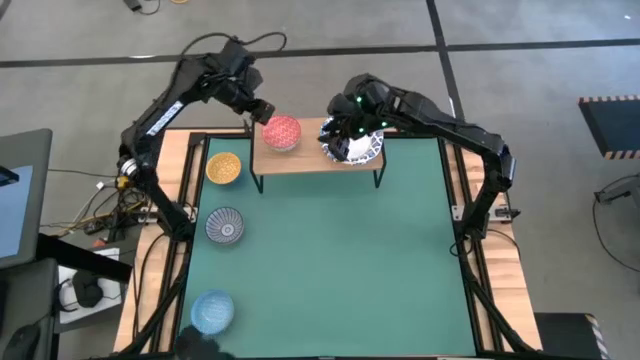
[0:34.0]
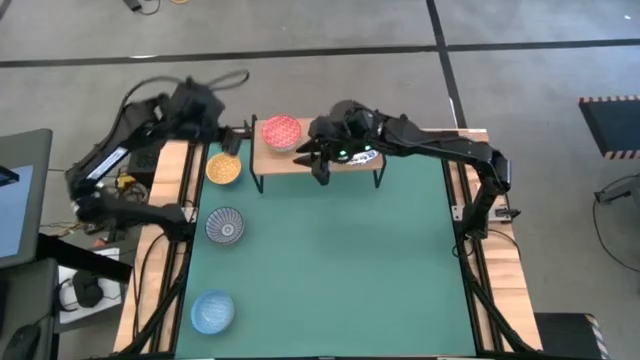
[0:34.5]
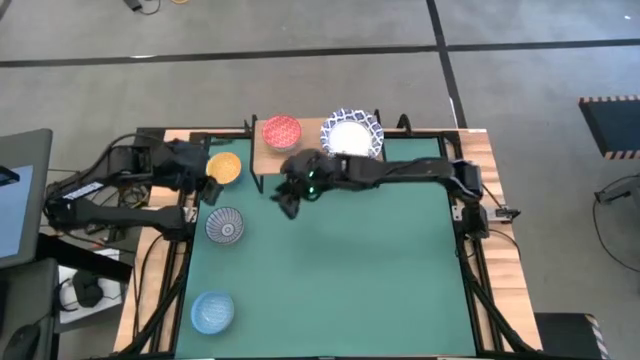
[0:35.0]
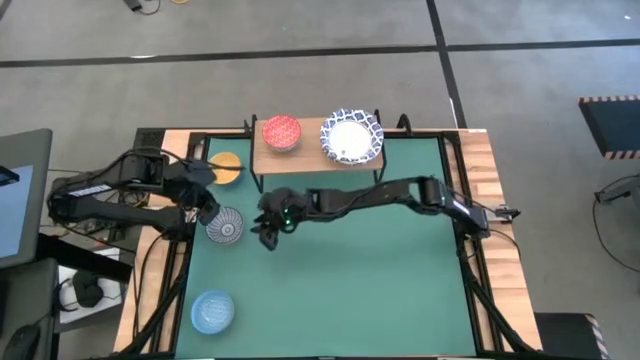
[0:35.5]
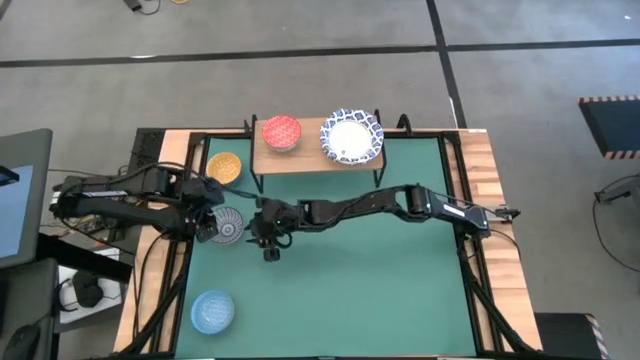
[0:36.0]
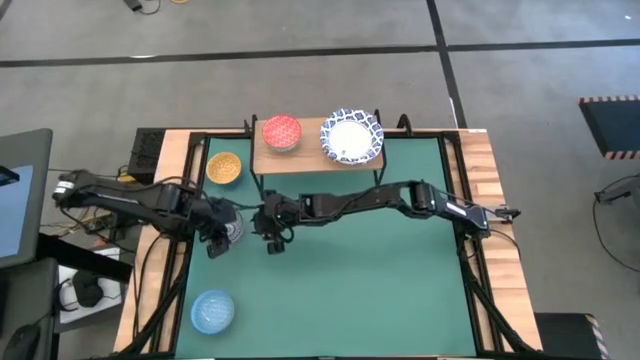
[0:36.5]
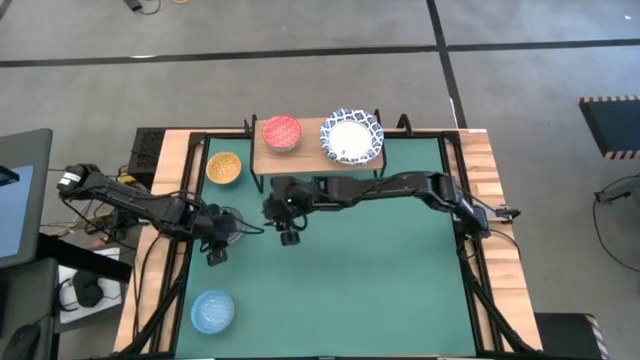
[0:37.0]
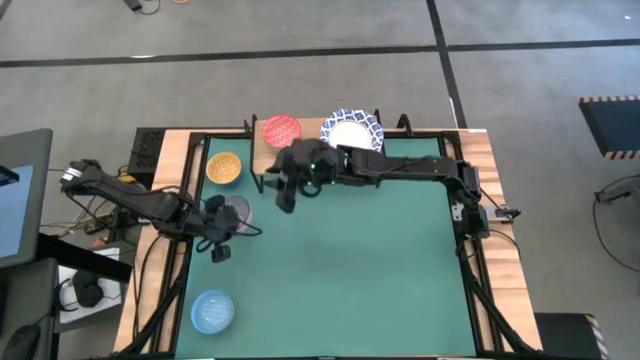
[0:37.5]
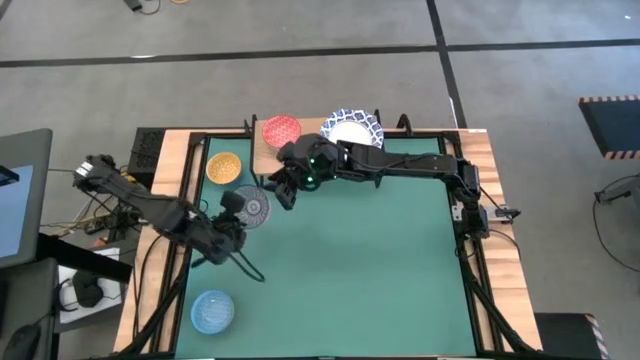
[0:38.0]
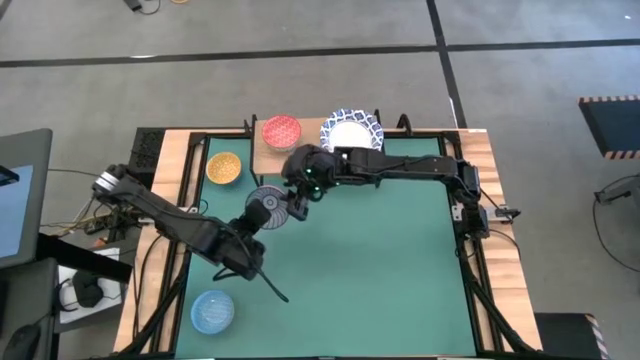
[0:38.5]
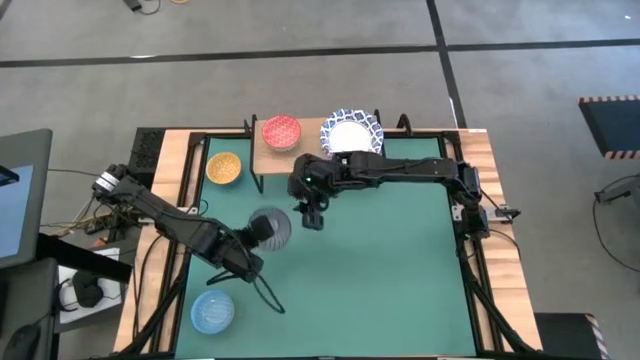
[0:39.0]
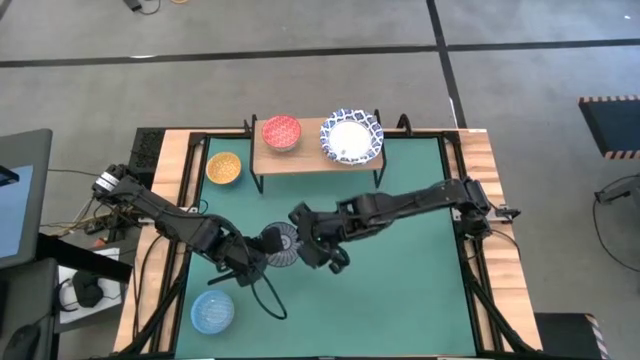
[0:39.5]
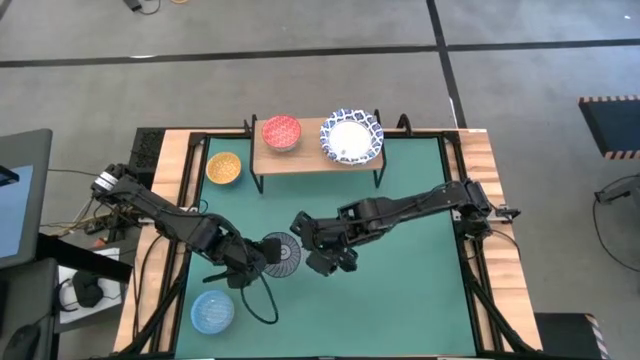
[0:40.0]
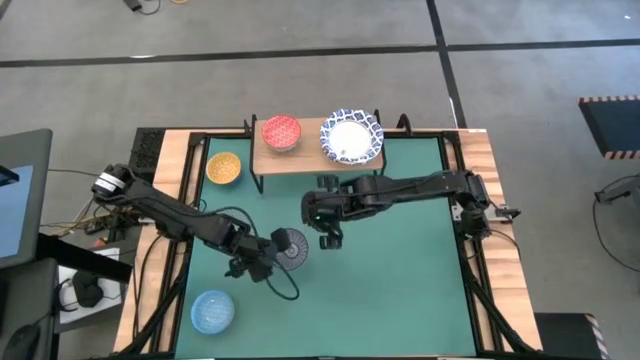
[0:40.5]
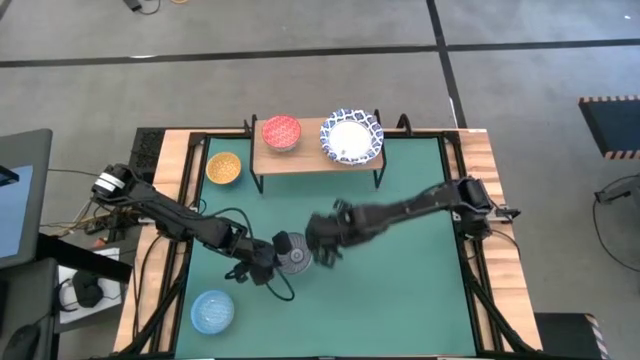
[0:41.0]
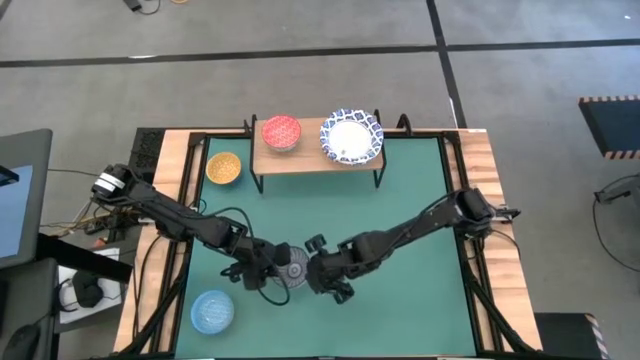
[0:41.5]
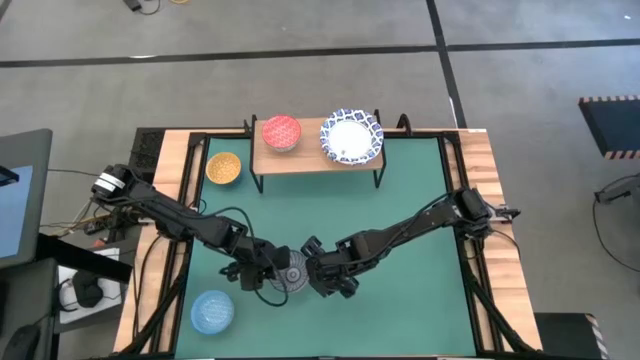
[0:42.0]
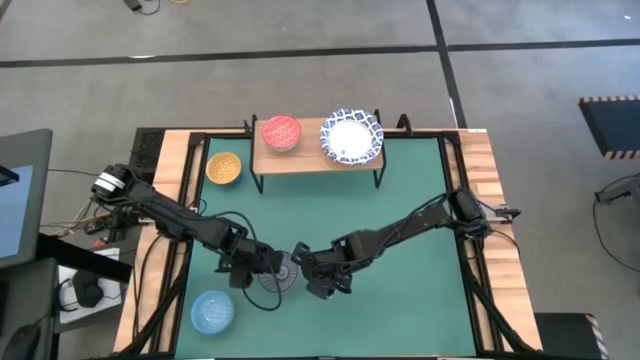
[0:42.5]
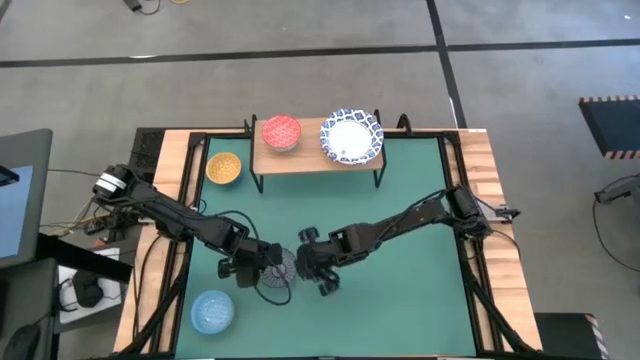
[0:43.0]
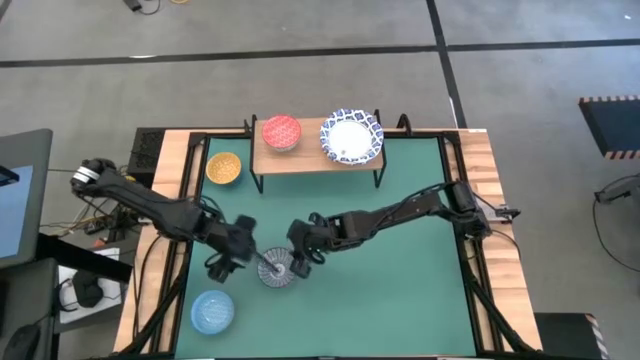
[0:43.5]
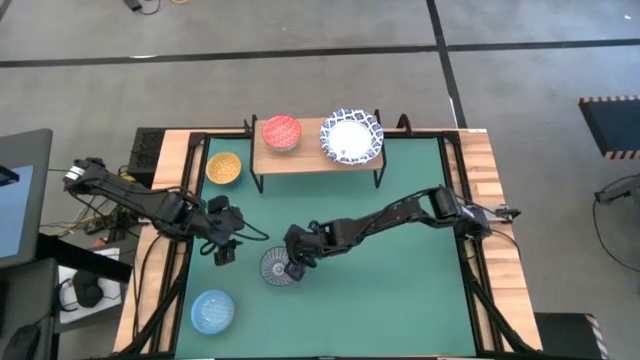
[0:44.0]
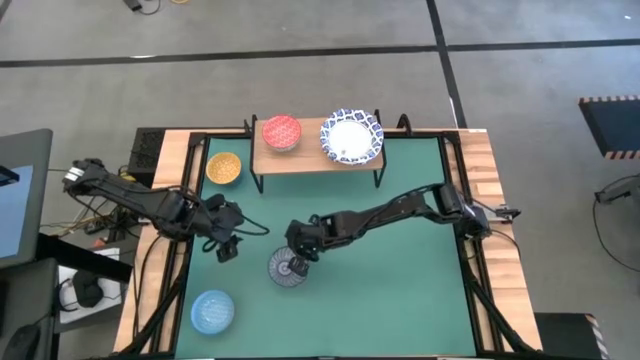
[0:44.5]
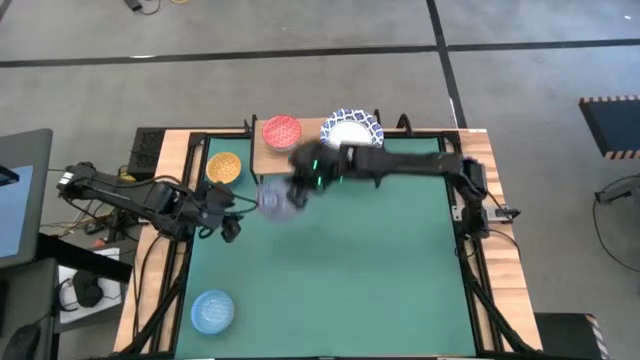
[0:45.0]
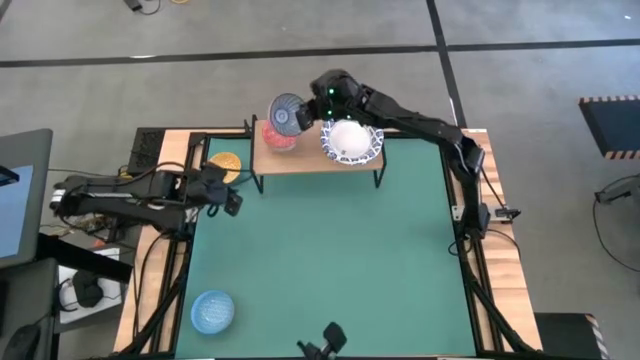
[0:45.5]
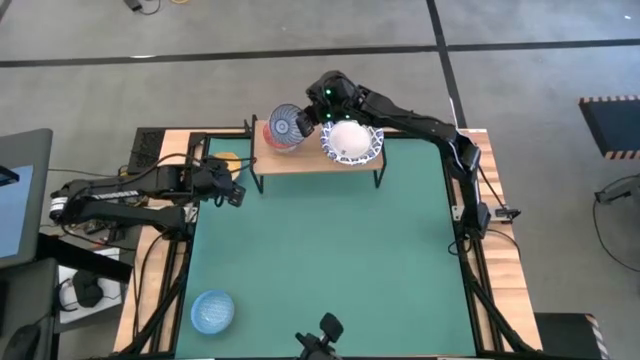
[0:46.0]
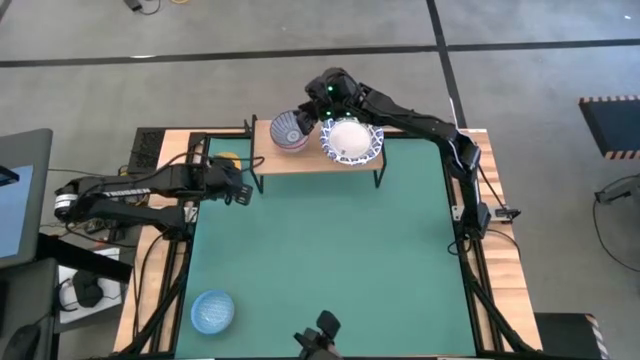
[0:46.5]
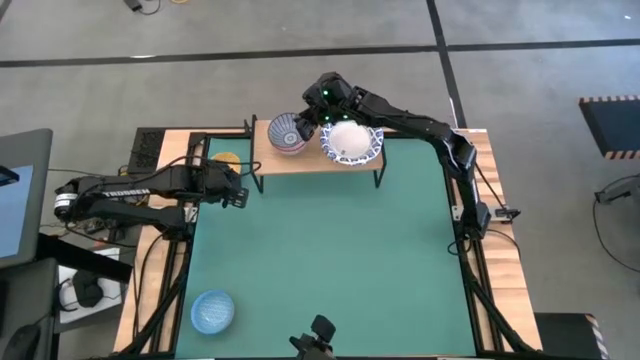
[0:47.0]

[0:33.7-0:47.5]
Task: Place and stack bowls onto a shelf
Stack the patterned blue bowl on top of the red bowl on the shelf

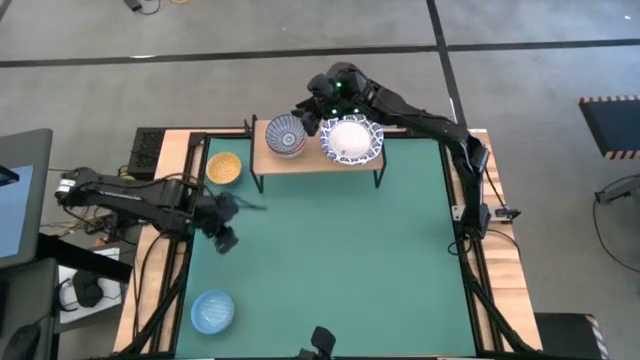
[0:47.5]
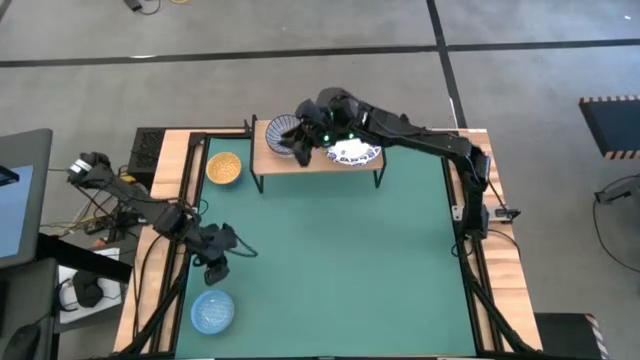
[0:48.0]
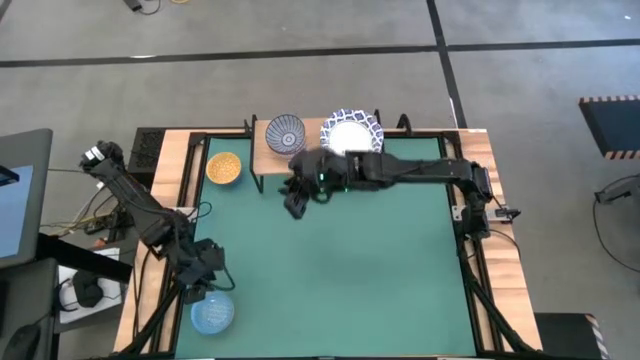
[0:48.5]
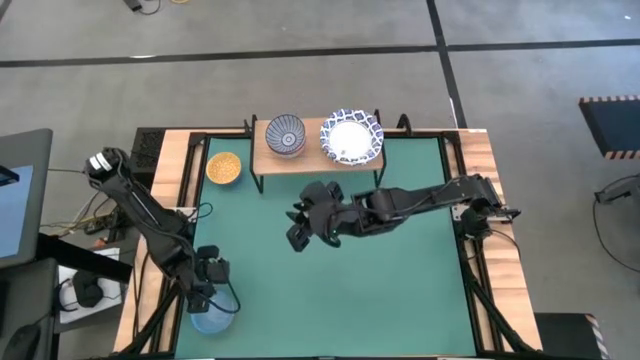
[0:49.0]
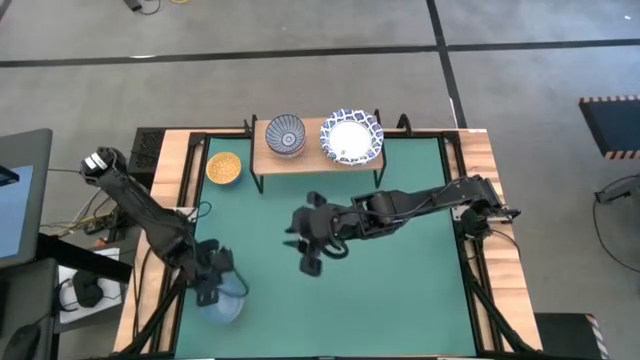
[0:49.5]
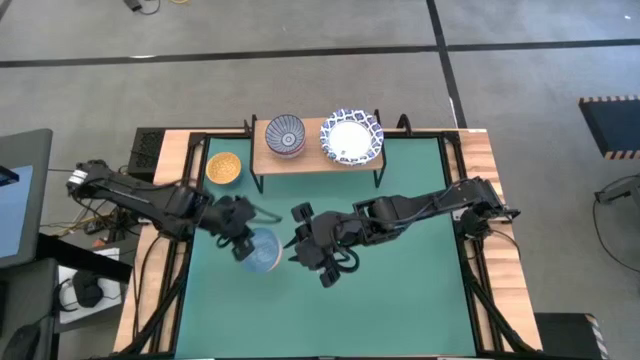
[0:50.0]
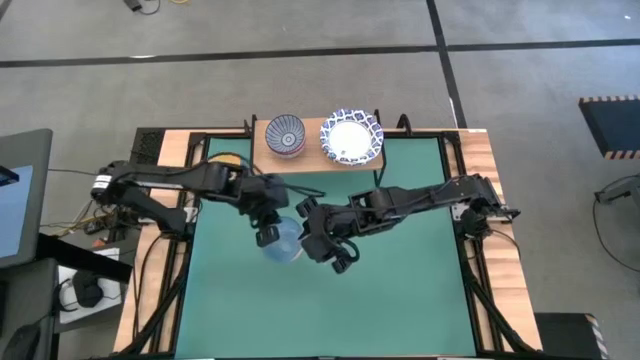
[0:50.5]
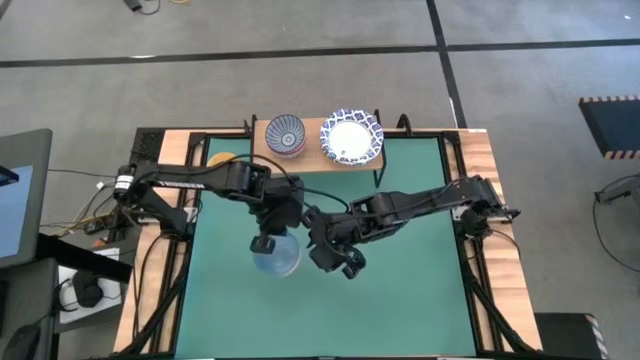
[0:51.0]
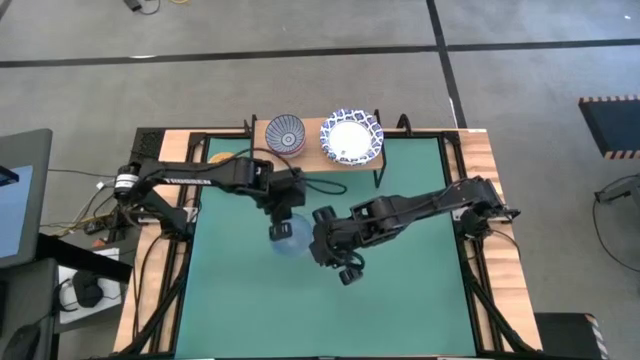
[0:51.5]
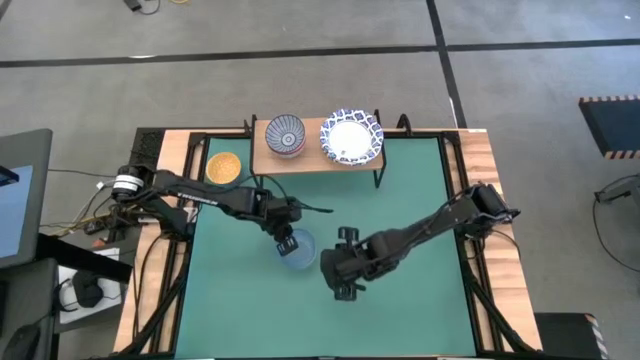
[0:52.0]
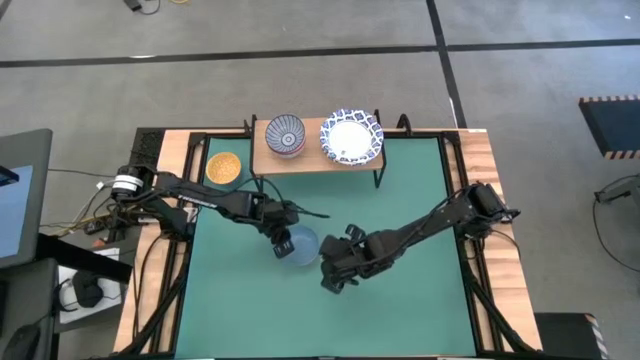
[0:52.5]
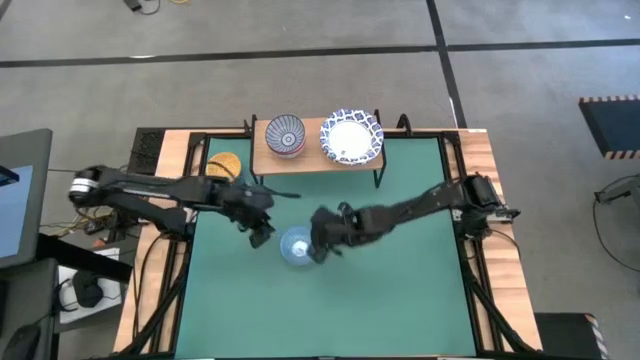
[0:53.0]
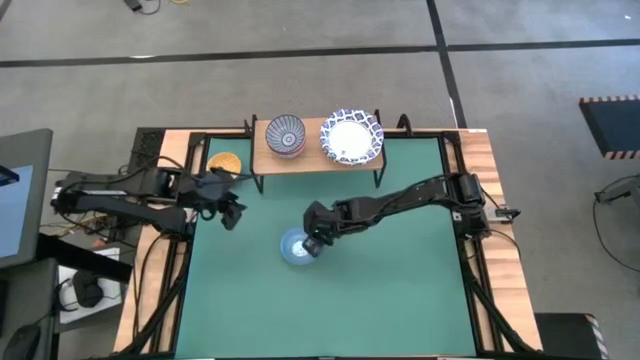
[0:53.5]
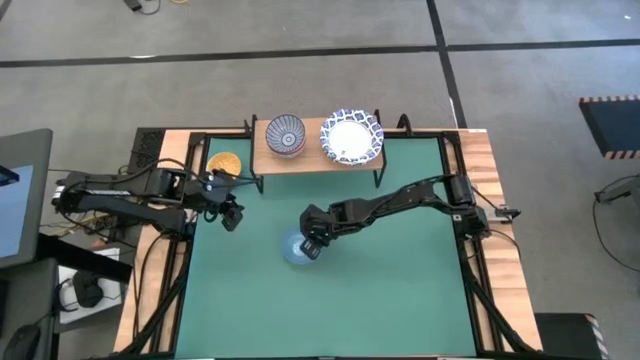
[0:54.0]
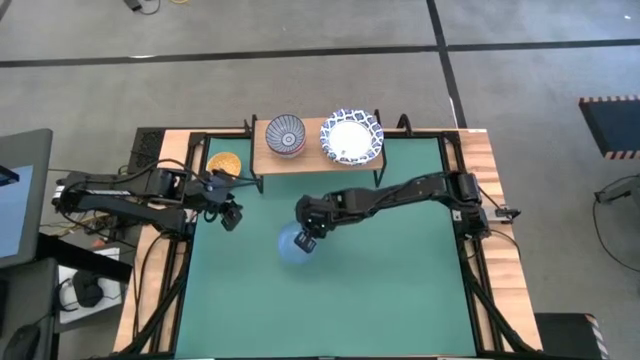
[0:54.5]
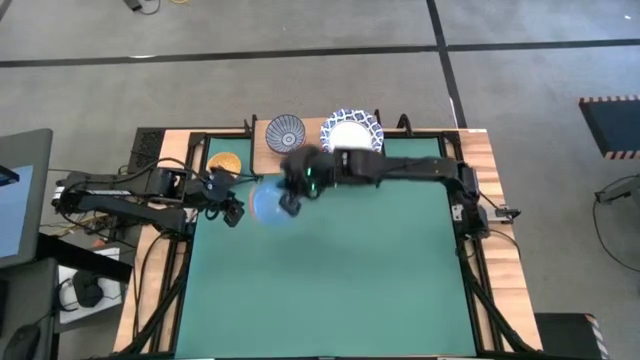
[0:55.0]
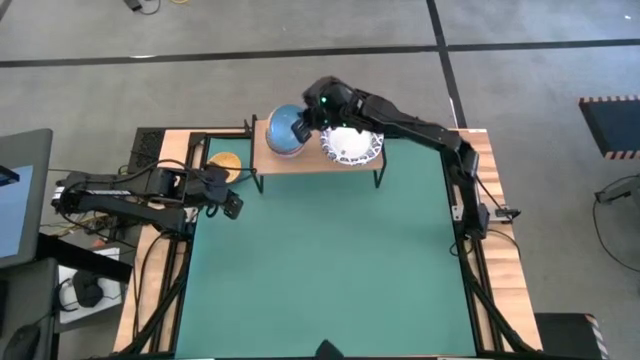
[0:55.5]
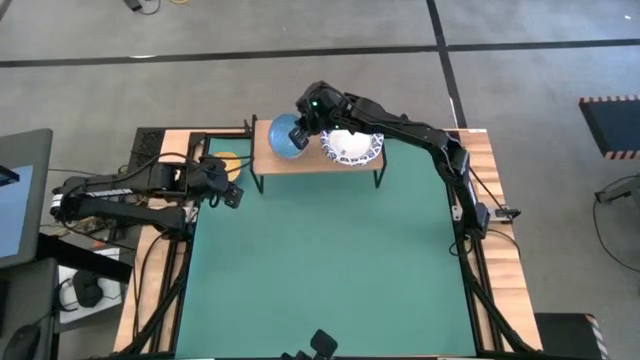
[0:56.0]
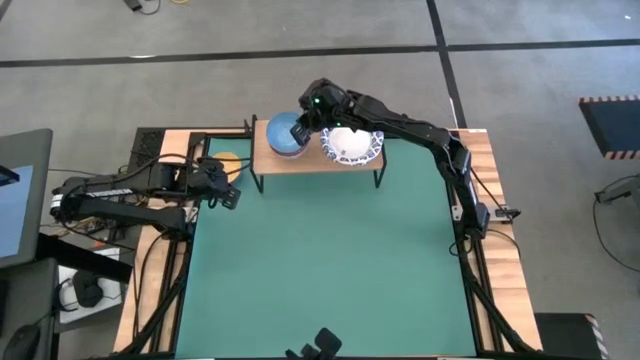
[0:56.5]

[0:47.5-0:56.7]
Stack the blue bowl on top of the patterned blue bowl on the shelf
